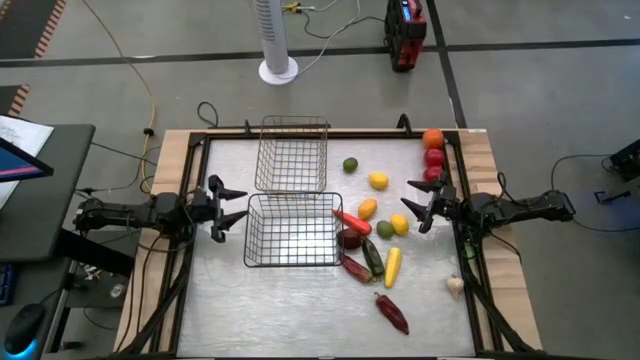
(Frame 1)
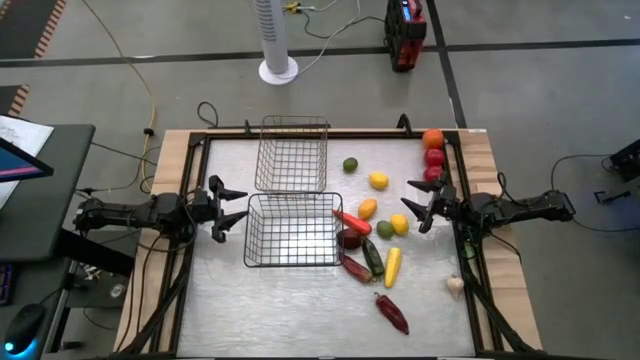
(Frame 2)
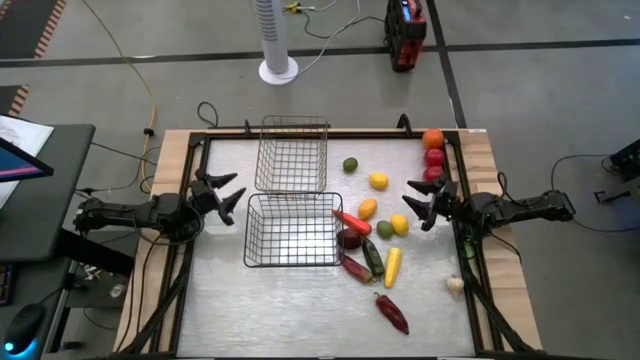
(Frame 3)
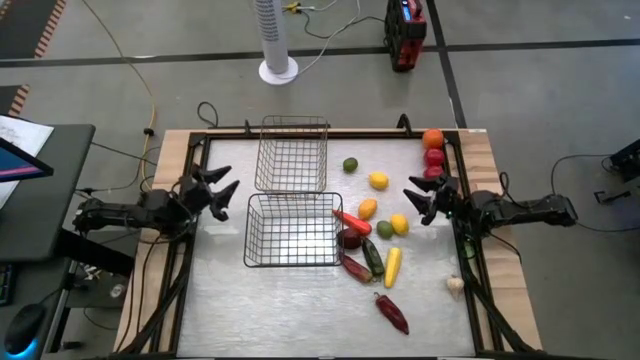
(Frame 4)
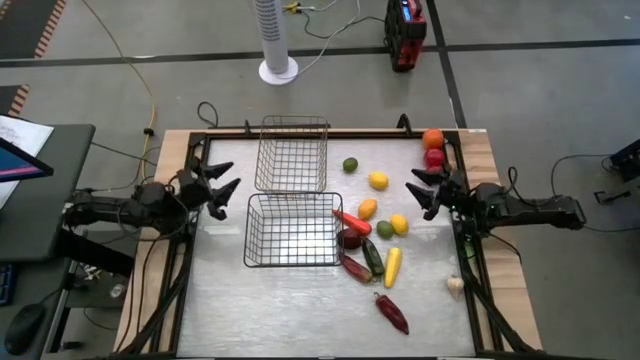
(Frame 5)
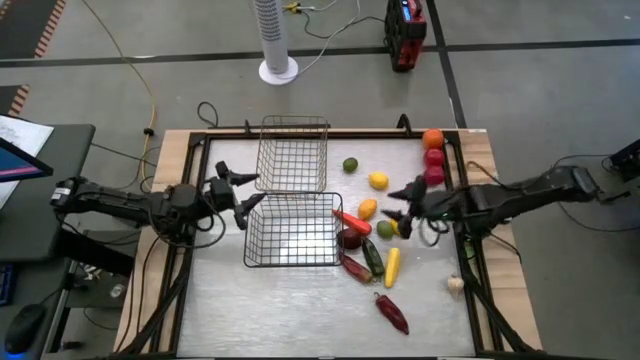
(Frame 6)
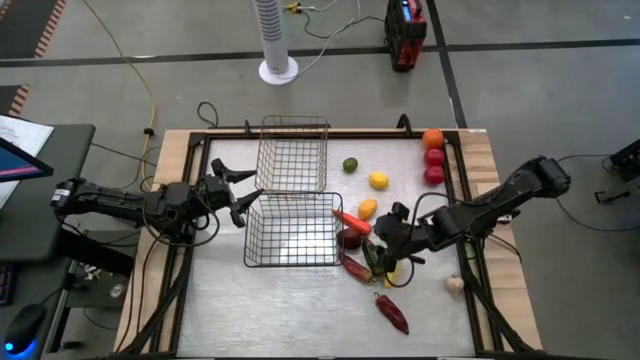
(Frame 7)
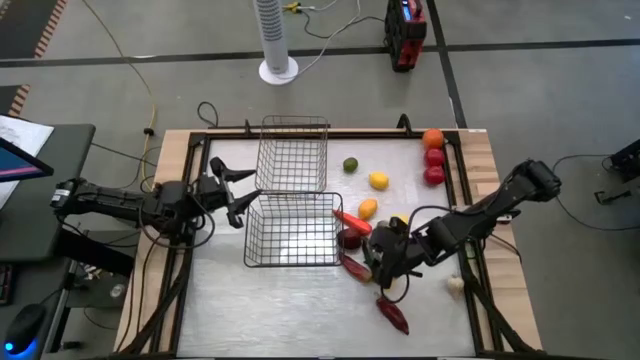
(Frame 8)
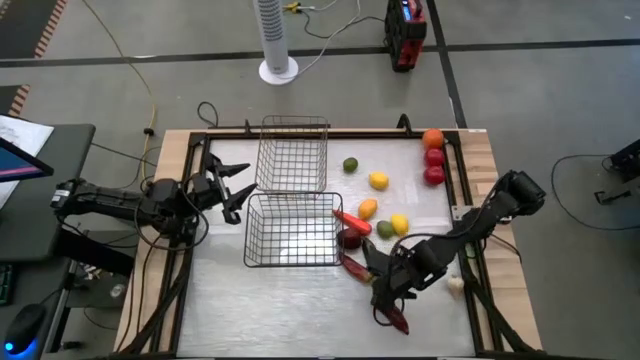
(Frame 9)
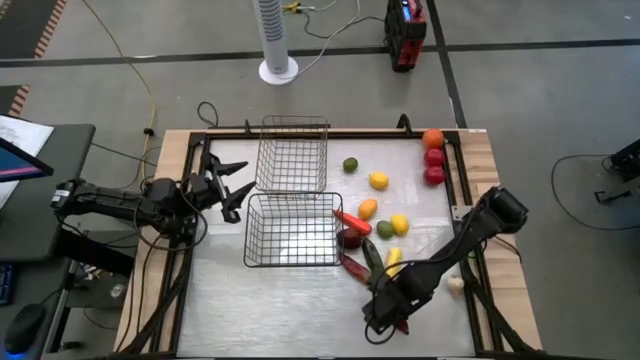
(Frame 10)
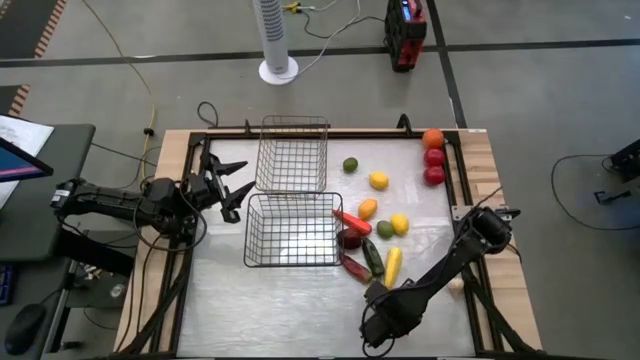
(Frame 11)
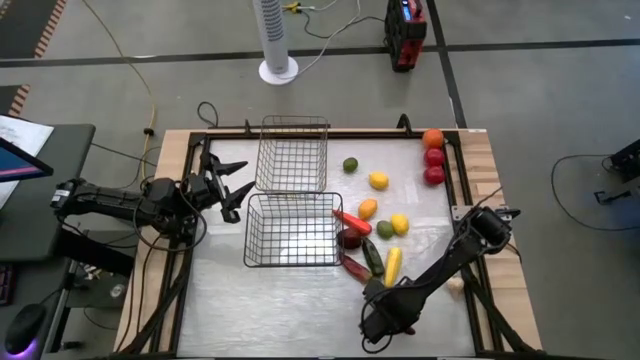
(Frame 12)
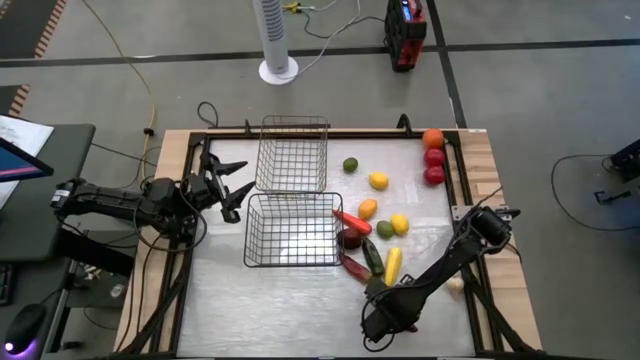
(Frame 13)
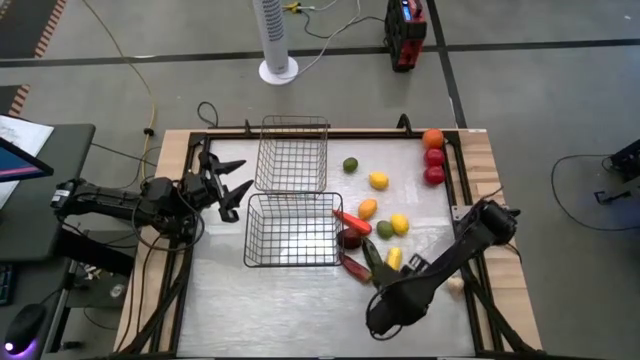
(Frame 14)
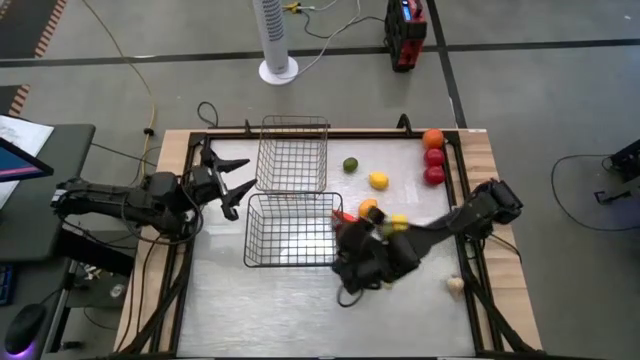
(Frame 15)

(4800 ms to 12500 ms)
Task: Sort produce into baskets
Put the bottom red chili pepper into the black wire basket

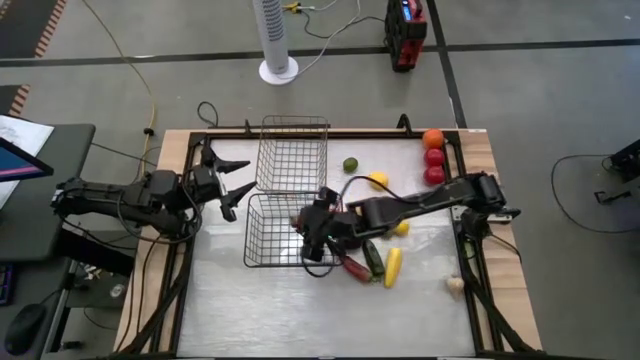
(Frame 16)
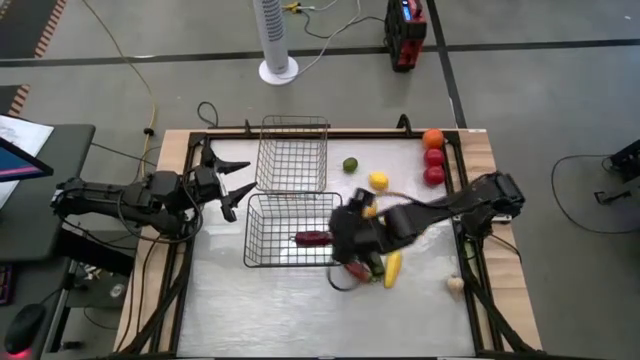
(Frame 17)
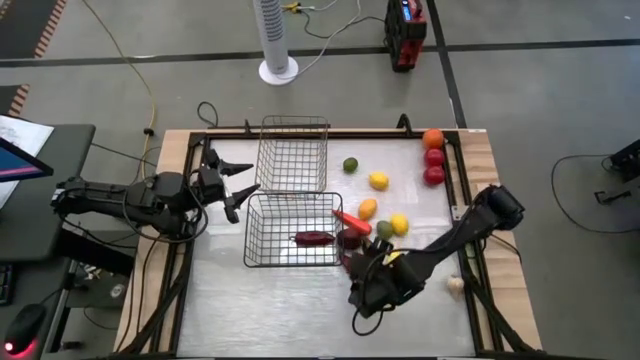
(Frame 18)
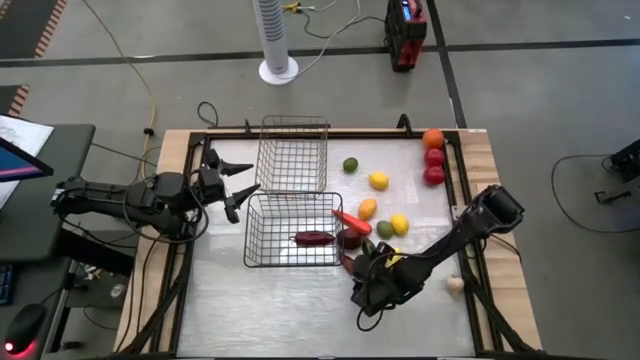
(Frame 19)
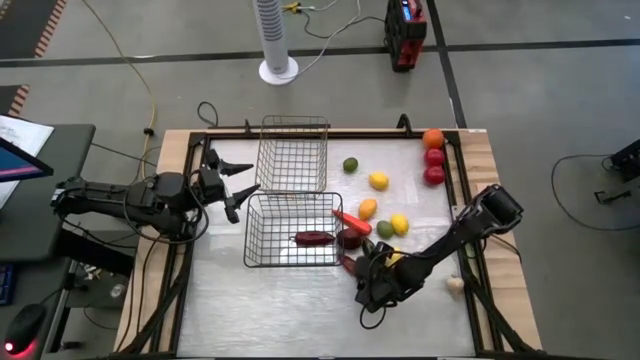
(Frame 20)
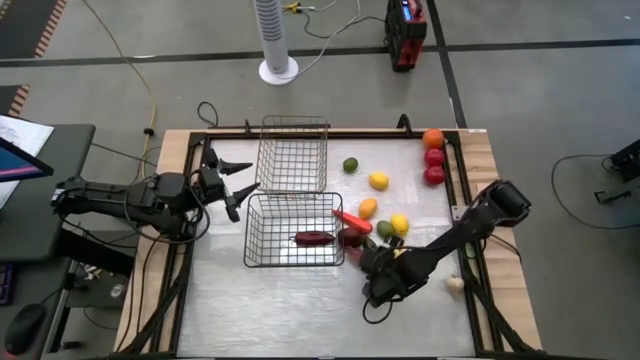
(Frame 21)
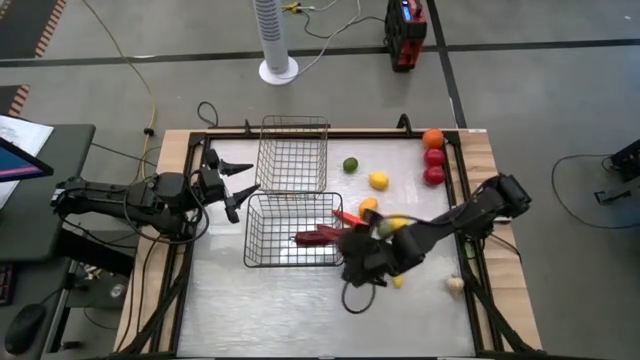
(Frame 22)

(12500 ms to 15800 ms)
Put the red chili pepper into the black wire basket

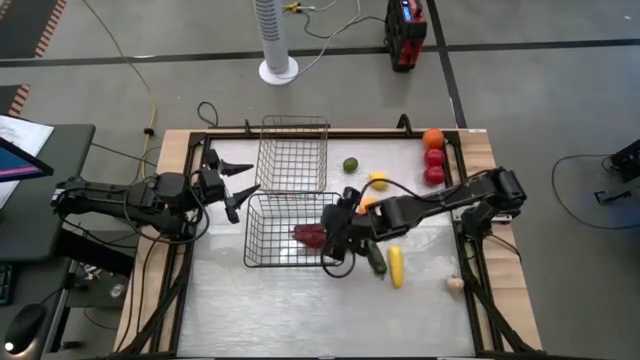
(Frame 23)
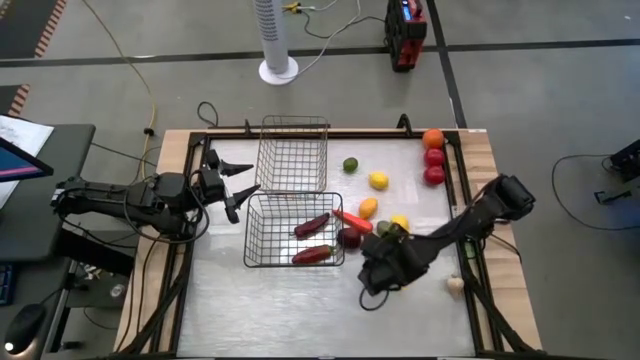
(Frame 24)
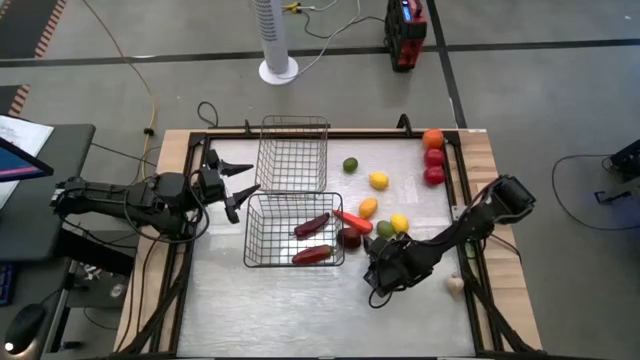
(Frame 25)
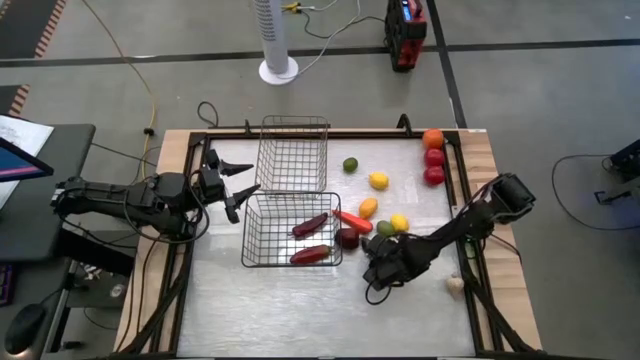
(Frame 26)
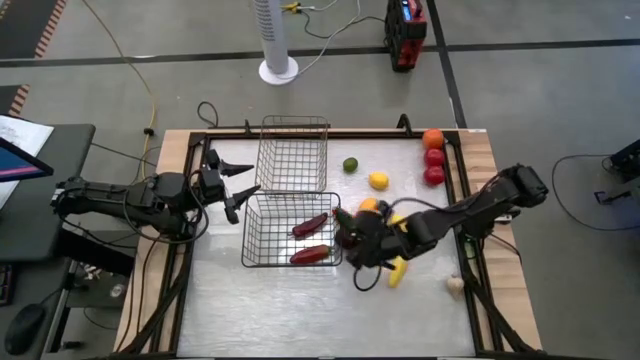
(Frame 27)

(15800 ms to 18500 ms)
Put the green chili pepper into the black wire basket

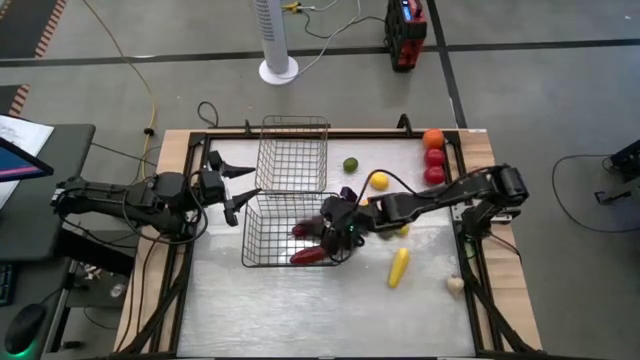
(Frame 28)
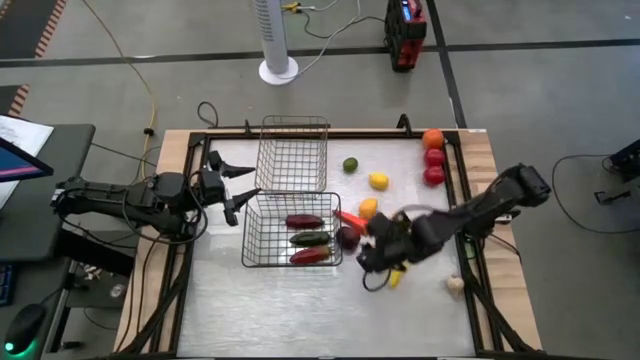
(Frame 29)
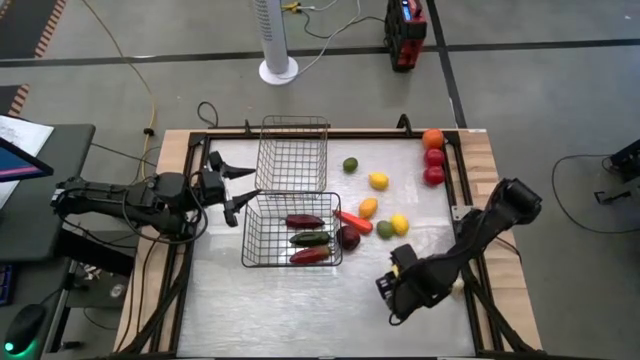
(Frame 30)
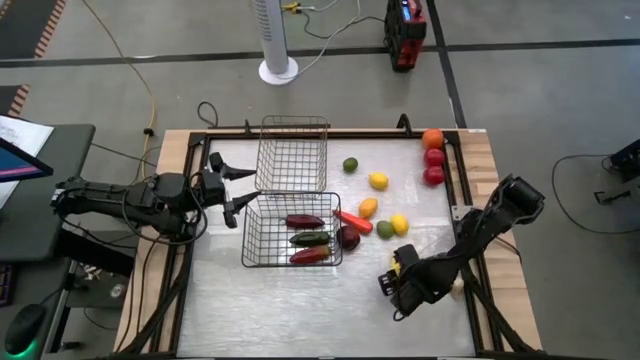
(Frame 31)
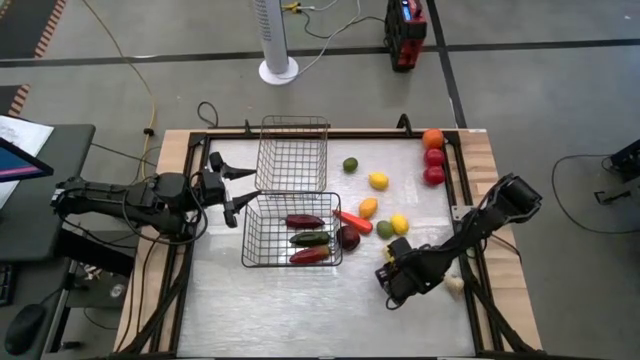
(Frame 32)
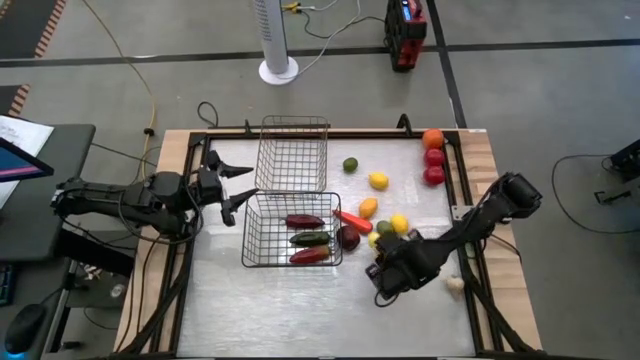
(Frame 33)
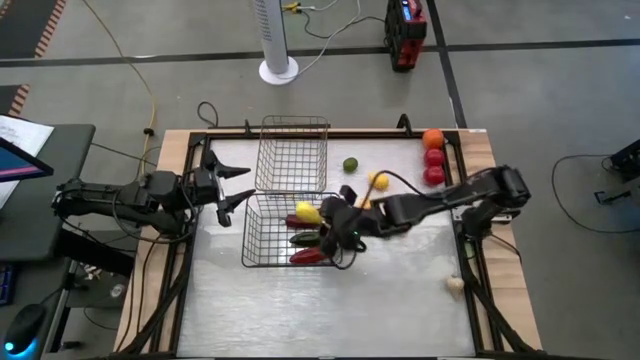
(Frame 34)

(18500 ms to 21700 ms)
Put the corn into the black wire basket

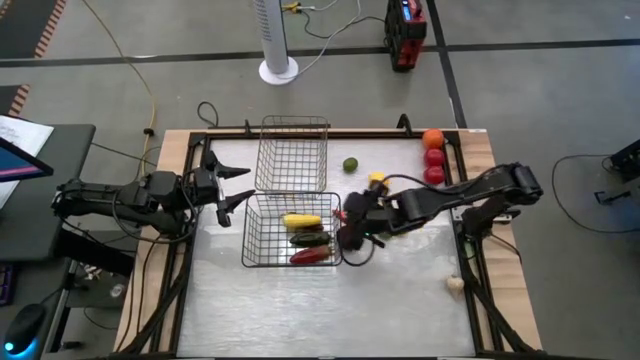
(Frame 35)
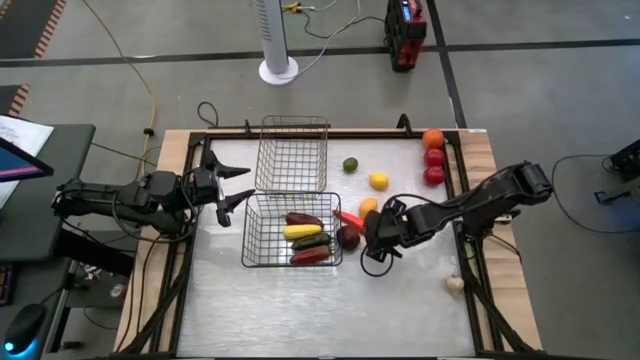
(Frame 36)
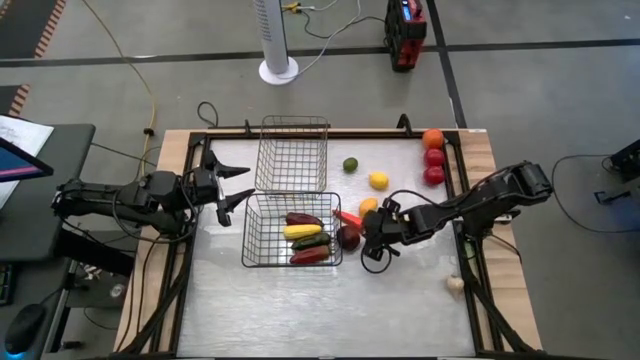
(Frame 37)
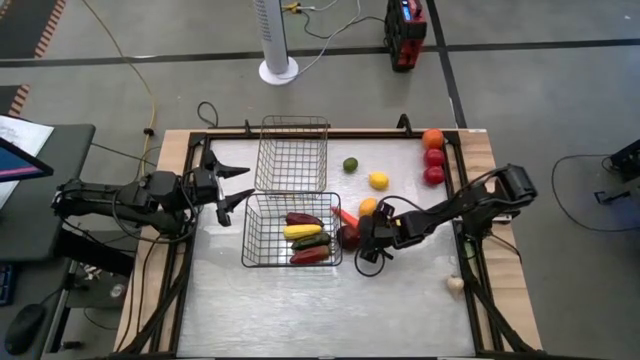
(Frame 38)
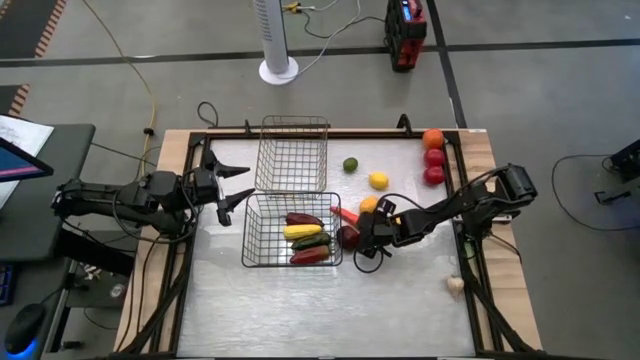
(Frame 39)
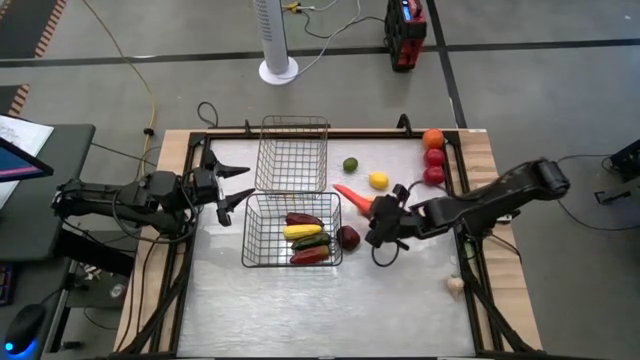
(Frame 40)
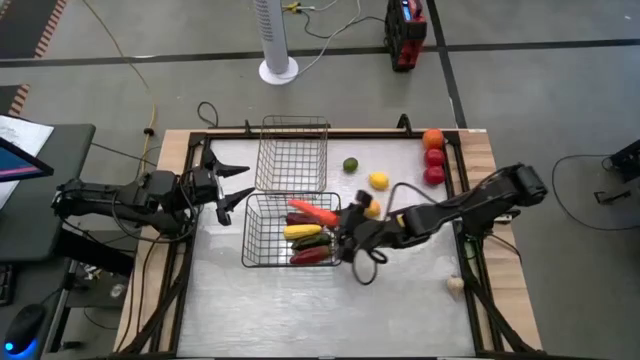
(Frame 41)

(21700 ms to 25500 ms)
Put the carrot into the black wire basket
